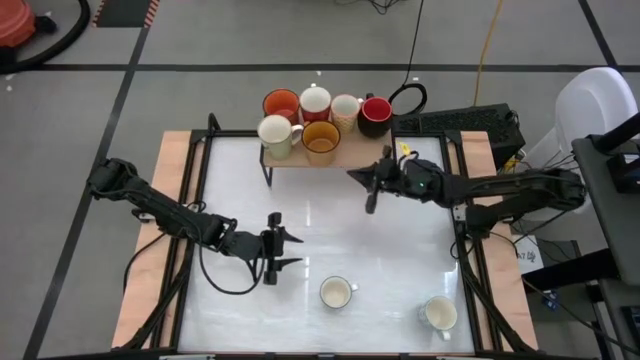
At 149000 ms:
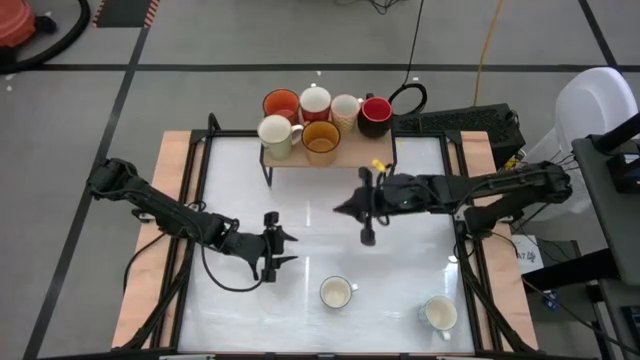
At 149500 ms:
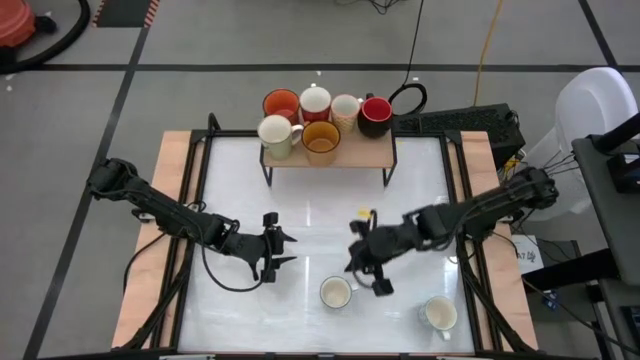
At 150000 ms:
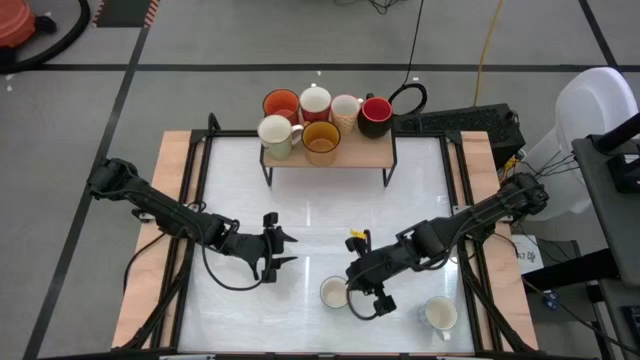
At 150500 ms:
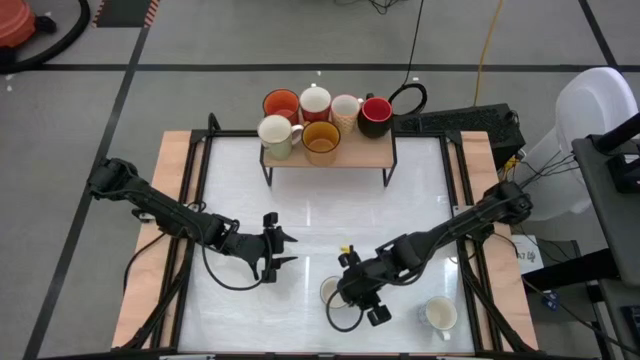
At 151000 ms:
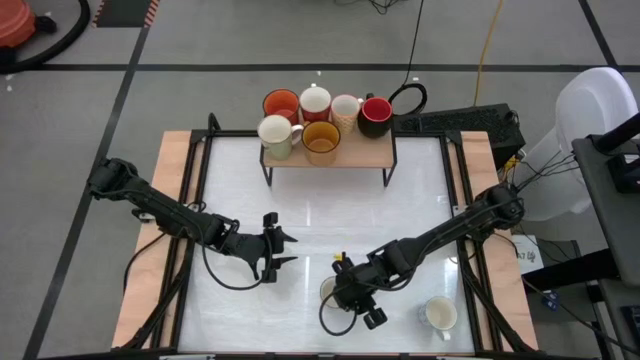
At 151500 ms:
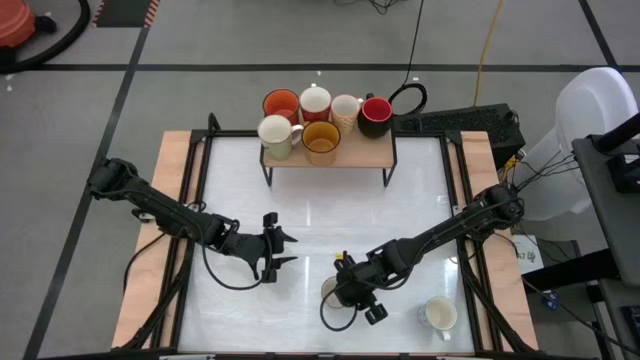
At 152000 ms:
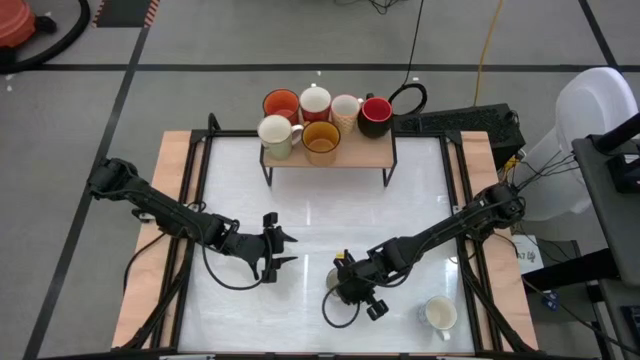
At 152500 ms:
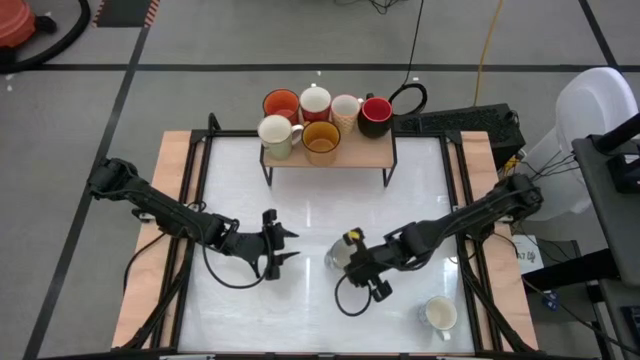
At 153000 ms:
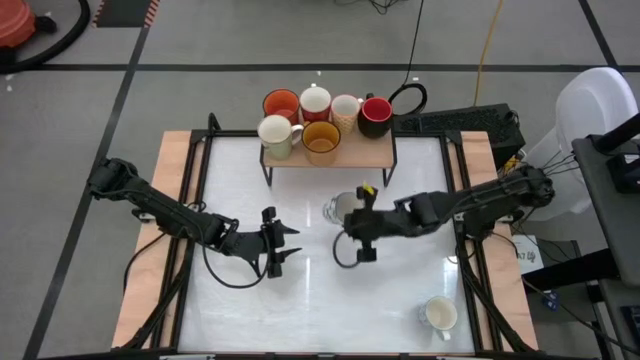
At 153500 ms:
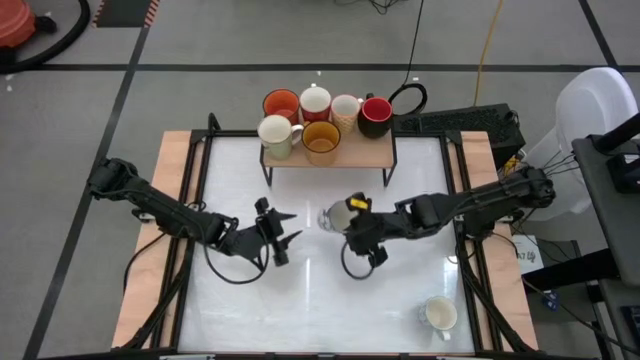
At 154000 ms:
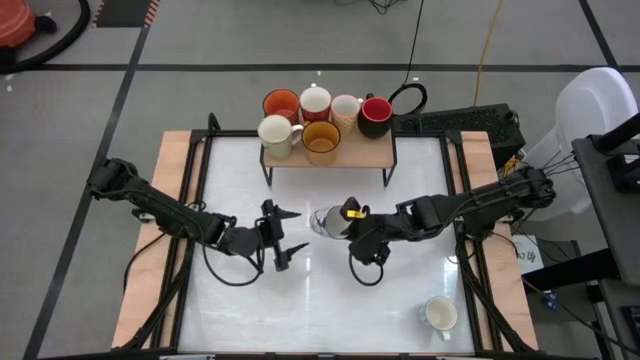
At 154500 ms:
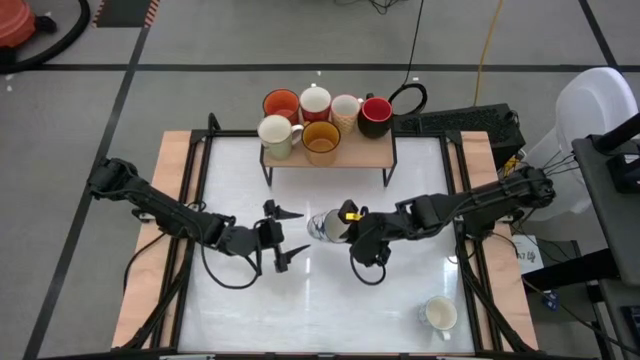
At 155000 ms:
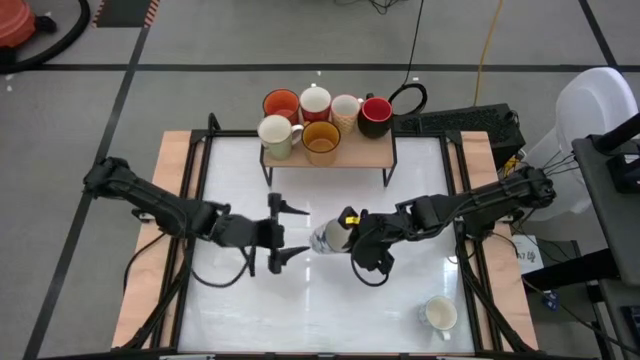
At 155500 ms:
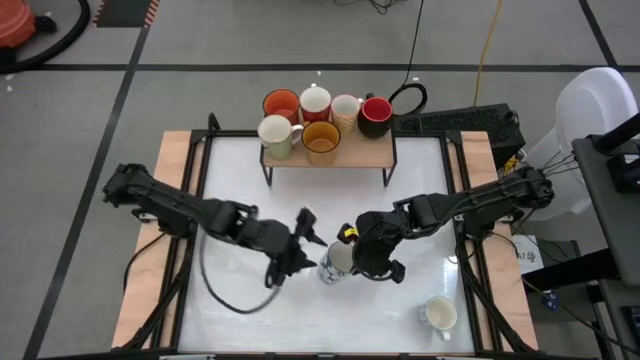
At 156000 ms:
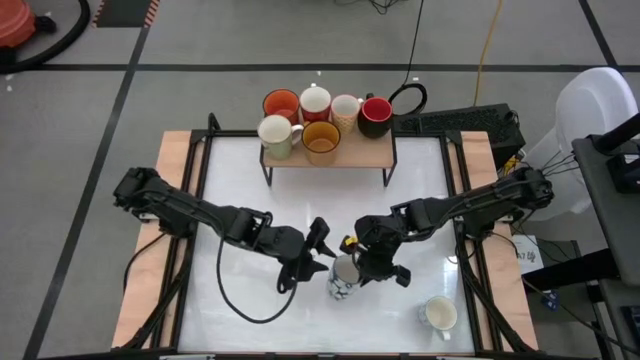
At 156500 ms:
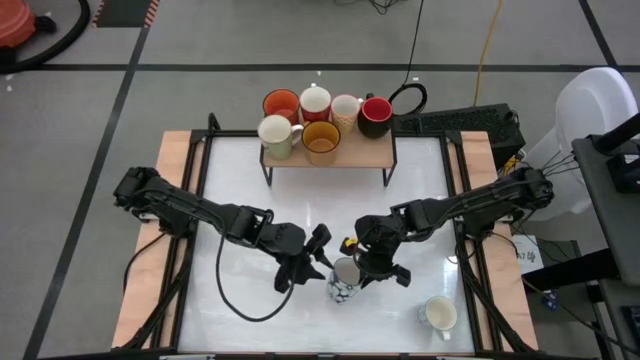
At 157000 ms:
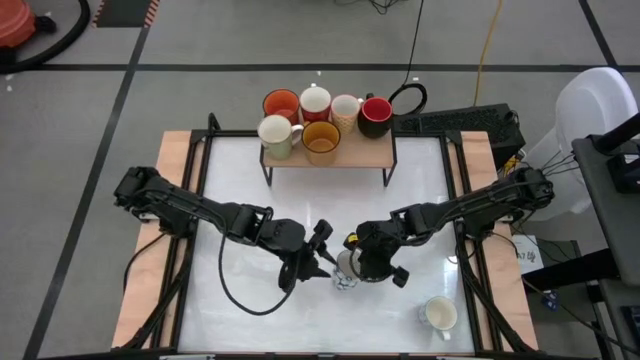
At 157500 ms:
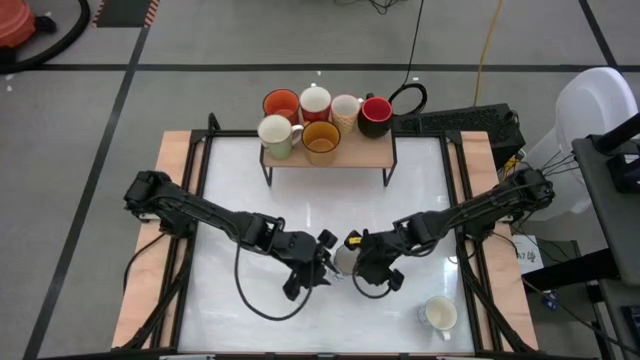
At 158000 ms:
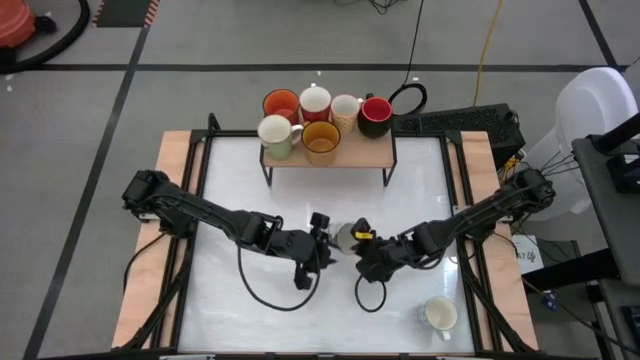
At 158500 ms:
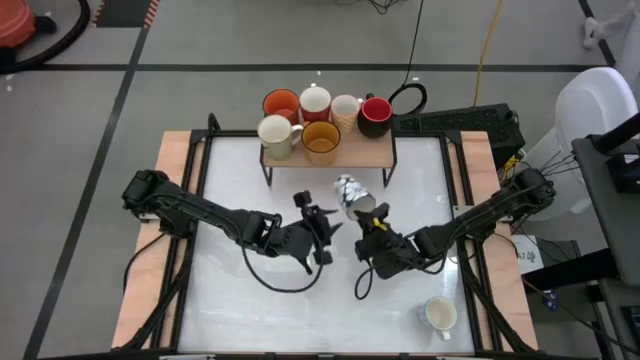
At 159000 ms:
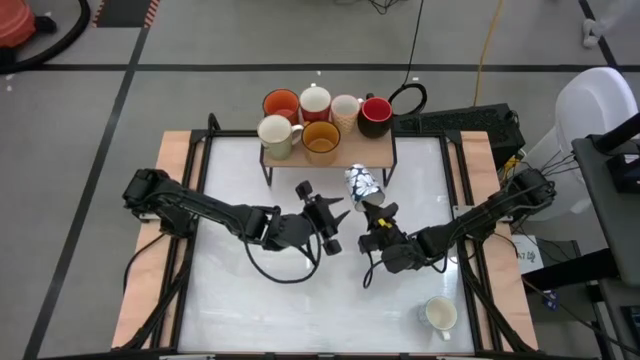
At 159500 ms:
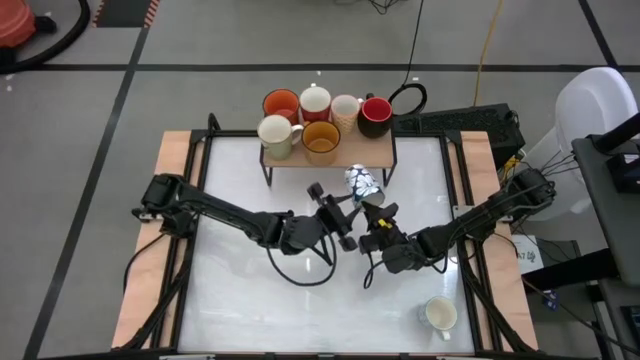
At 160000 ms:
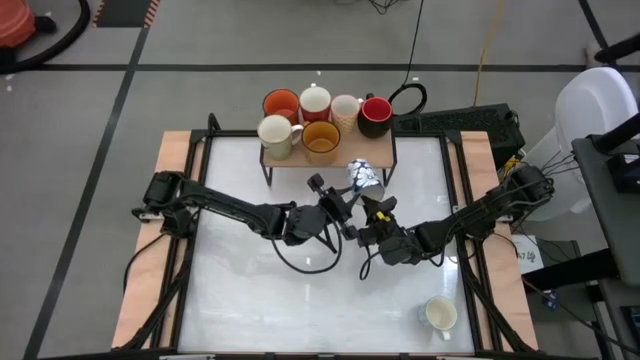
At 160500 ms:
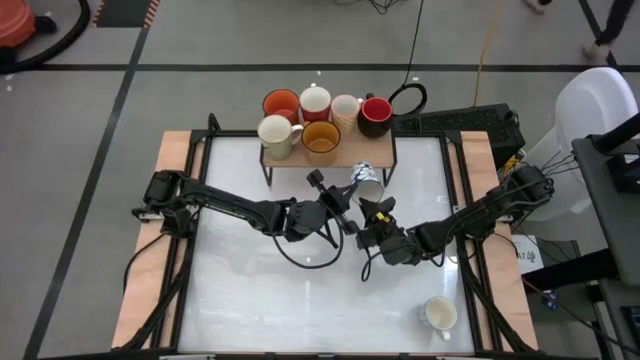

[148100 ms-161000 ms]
Task: Place coffee mugs
Put the blue patterned mug on the shelf

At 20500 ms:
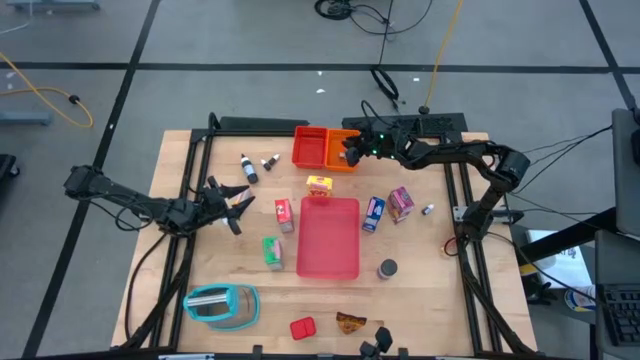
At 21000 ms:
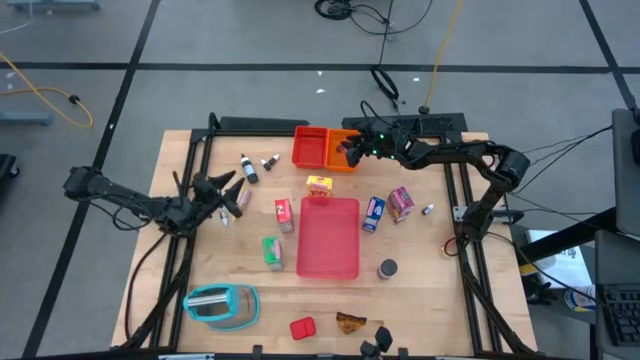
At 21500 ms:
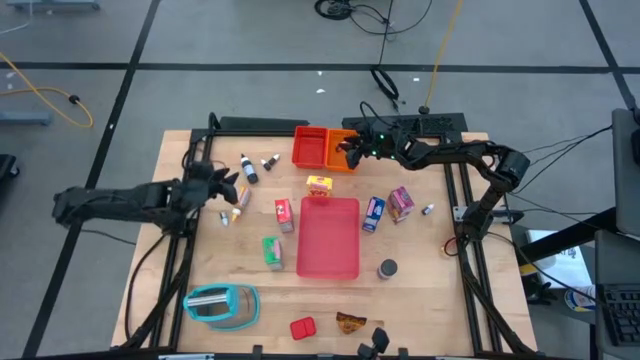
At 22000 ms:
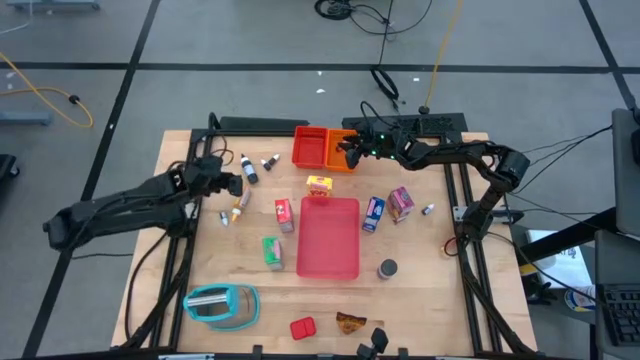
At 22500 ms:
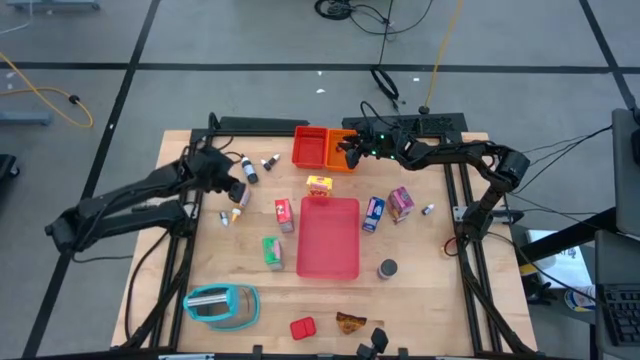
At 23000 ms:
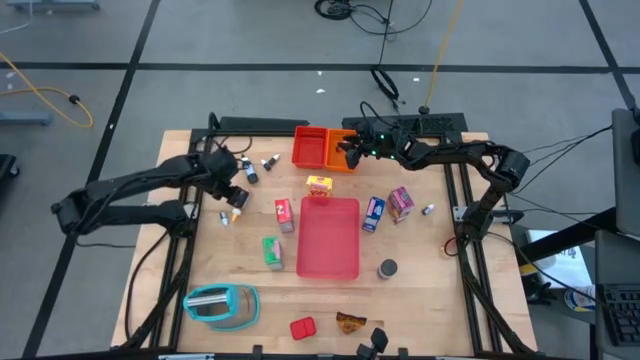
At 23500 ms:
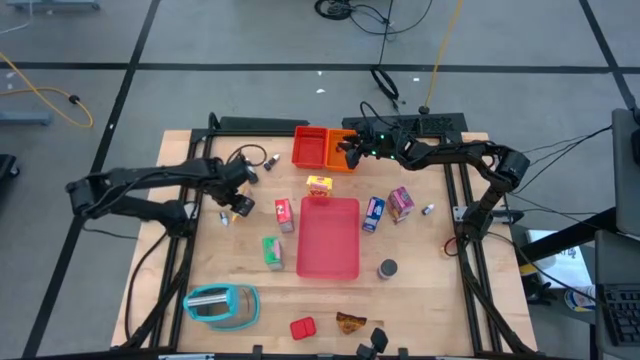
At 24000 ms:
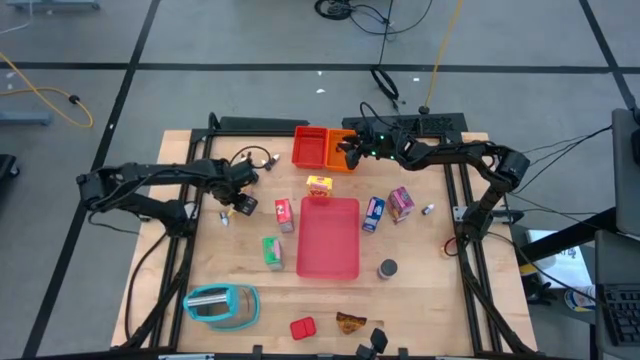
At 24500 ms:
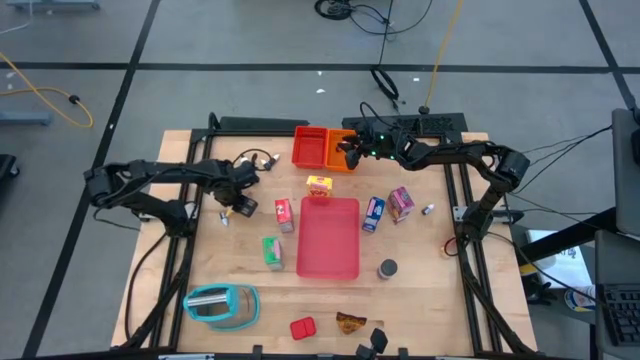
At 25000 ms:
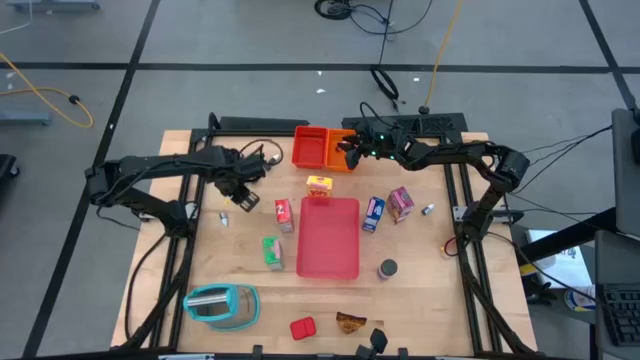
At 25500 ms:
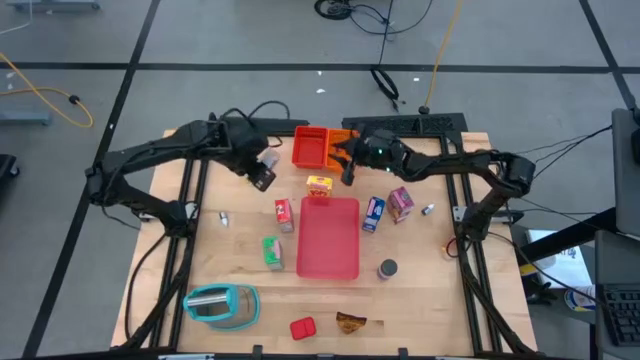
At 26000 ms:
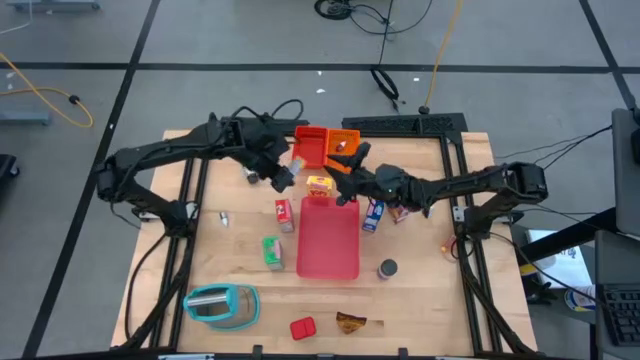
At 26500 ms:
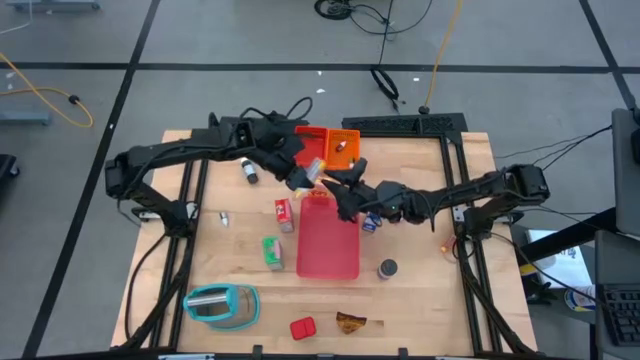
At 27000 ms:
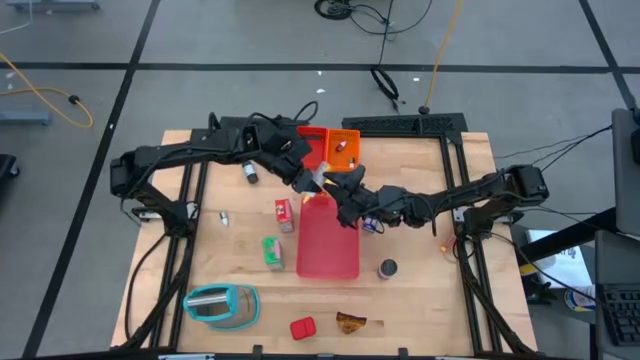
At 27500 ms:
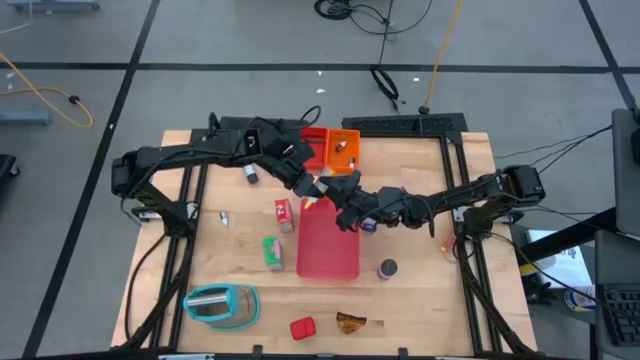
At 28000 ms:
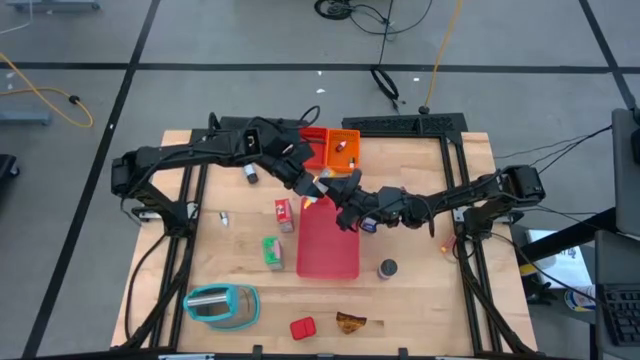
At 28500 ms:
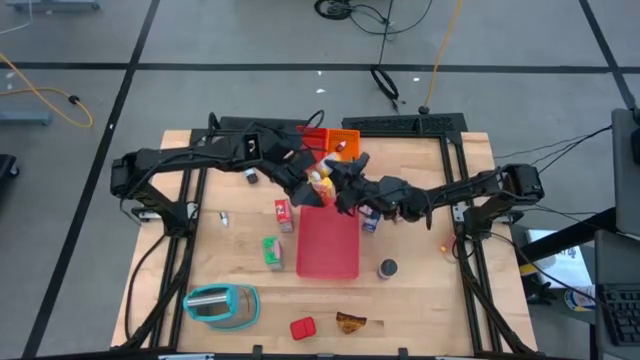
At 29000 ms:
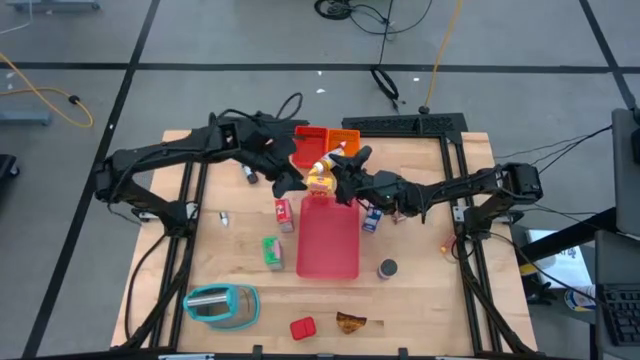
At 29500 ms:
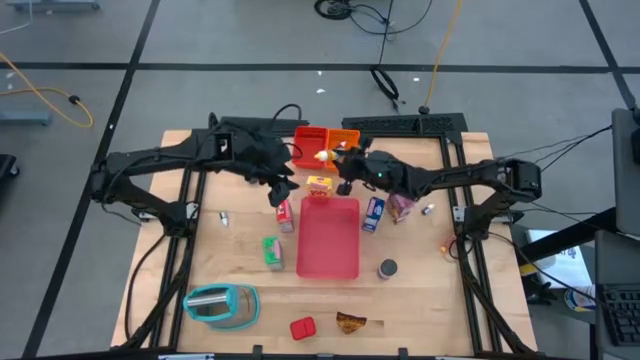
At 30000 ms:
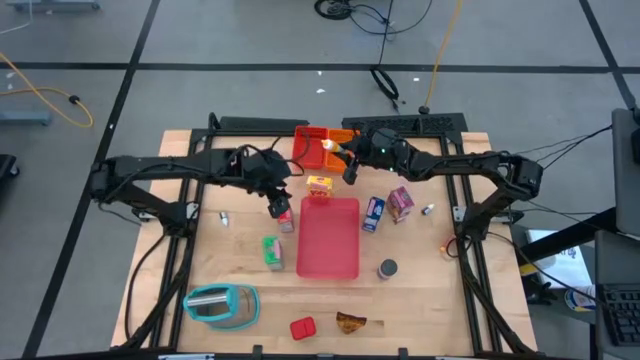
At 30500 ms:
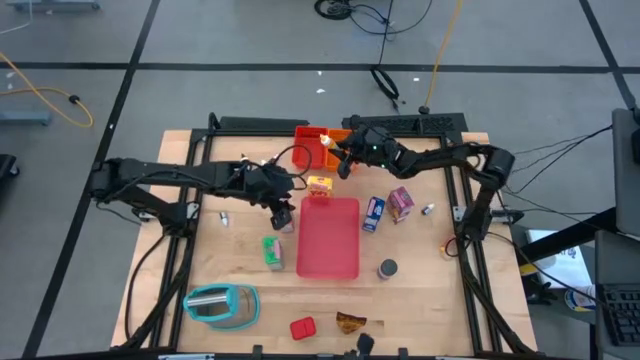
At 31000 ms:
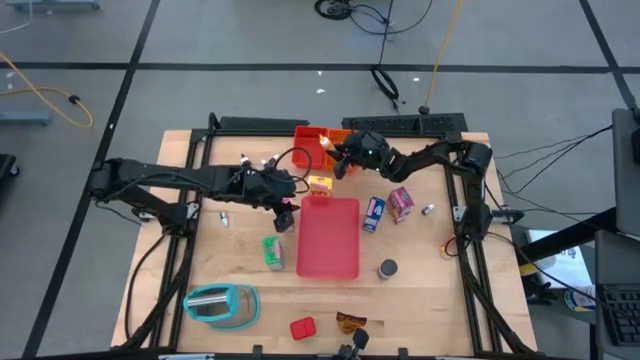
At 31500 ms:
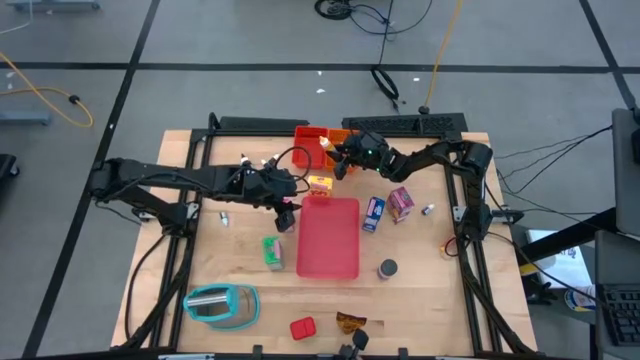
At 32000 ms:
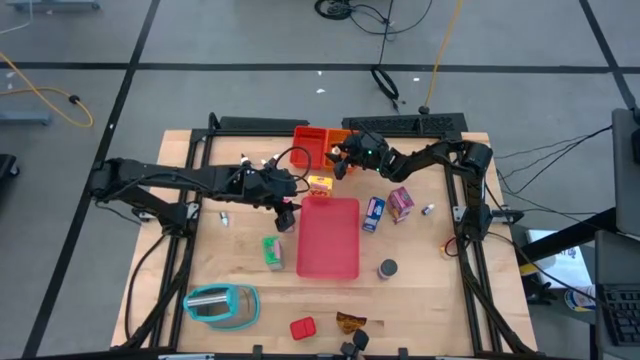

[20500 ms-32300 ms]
Task: Pick & Place Kitchen Items
Put the yellow food coloring bottle into the orange basket
